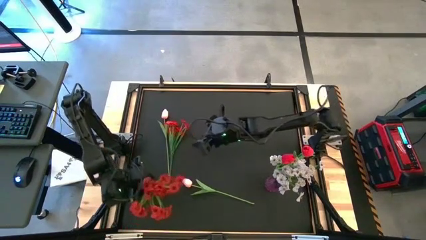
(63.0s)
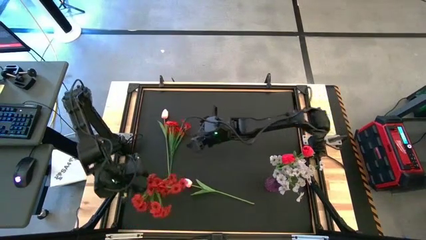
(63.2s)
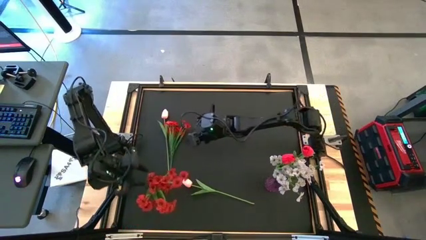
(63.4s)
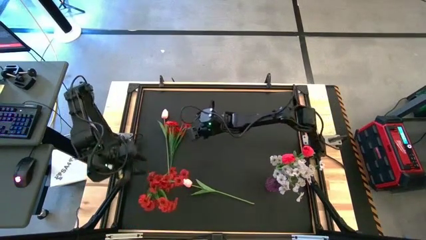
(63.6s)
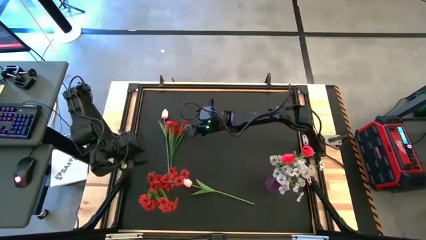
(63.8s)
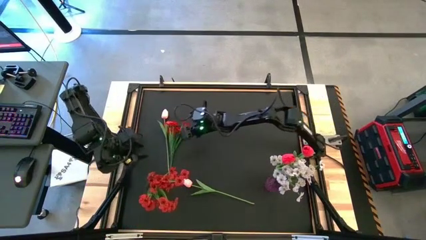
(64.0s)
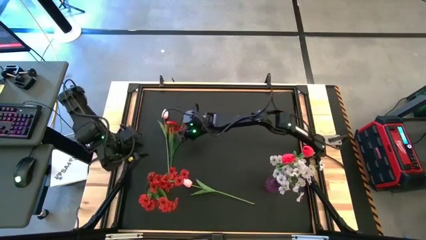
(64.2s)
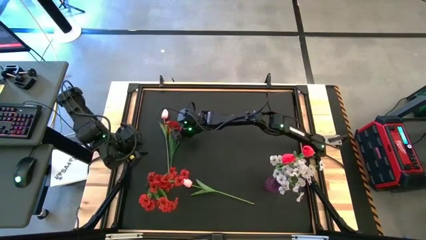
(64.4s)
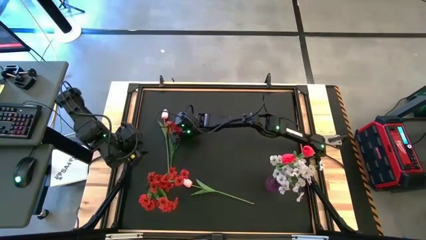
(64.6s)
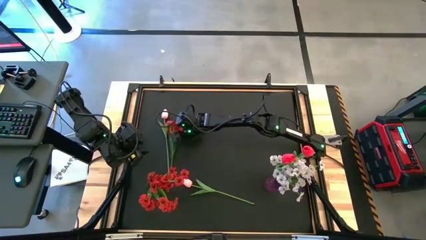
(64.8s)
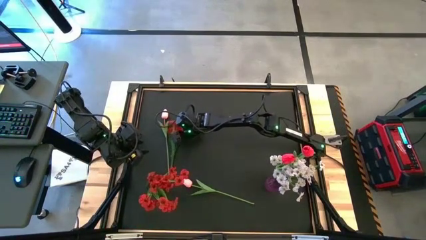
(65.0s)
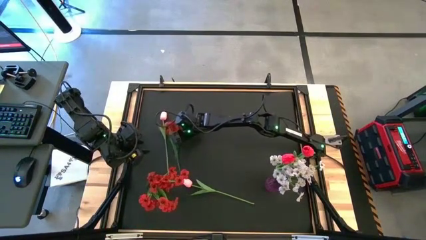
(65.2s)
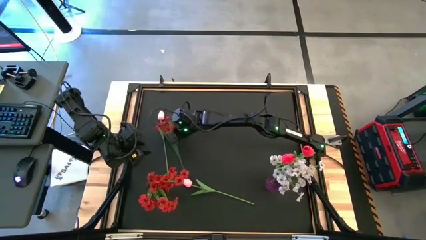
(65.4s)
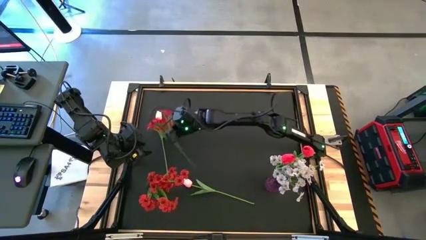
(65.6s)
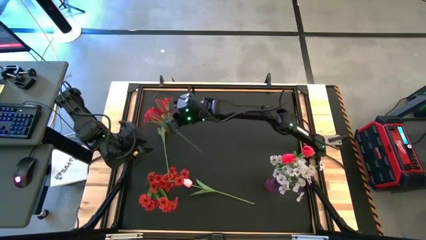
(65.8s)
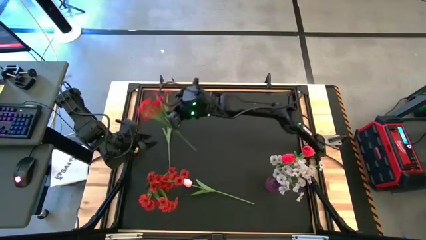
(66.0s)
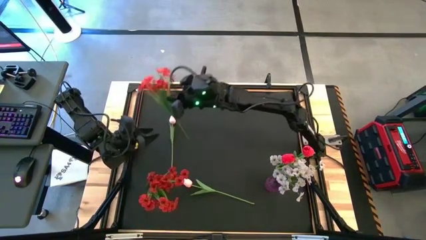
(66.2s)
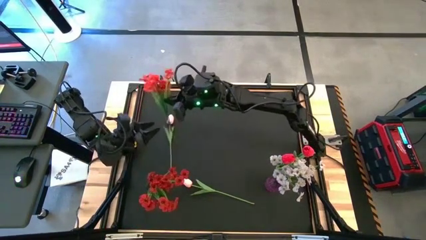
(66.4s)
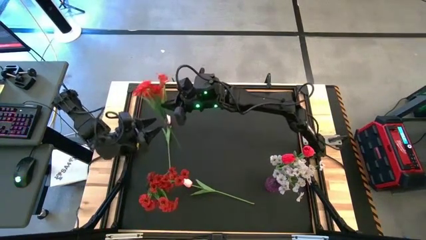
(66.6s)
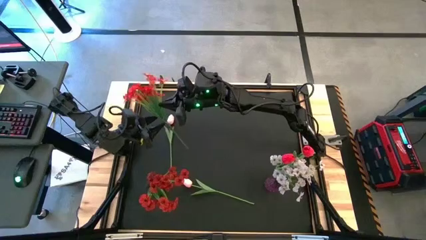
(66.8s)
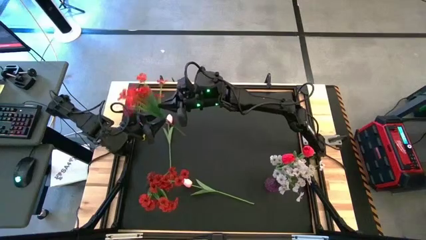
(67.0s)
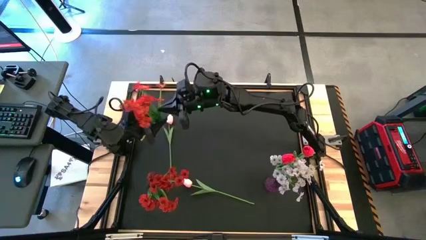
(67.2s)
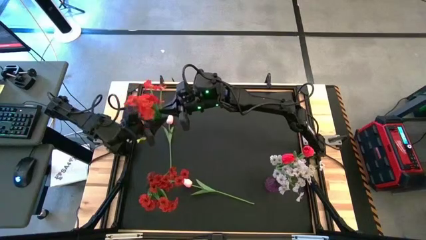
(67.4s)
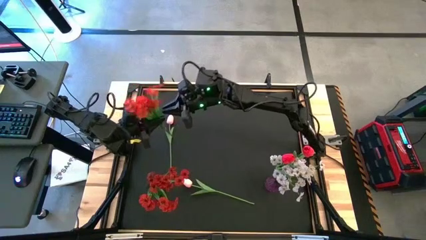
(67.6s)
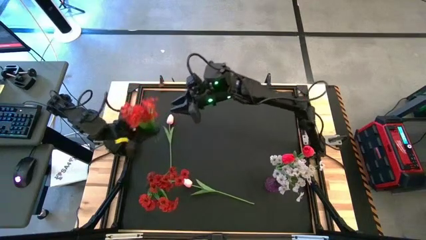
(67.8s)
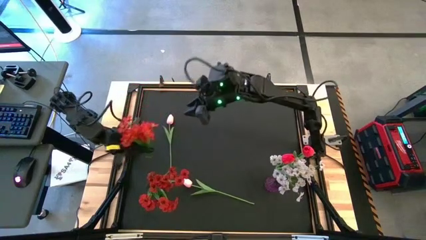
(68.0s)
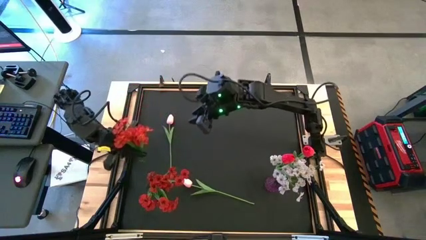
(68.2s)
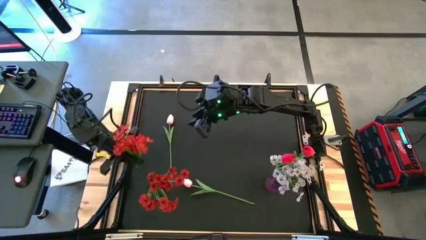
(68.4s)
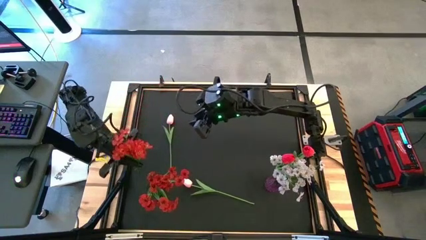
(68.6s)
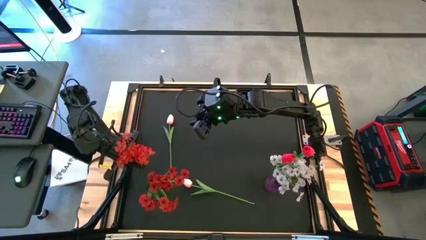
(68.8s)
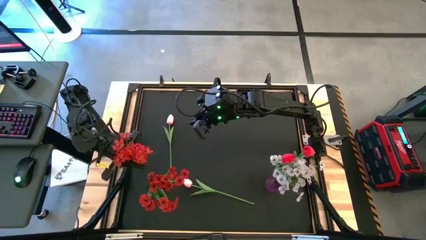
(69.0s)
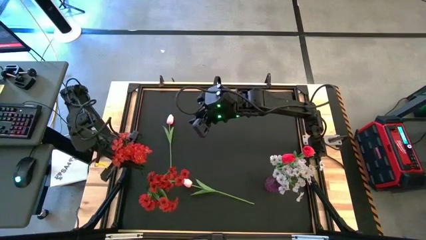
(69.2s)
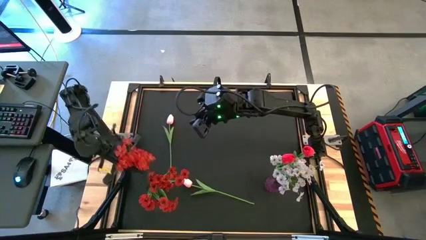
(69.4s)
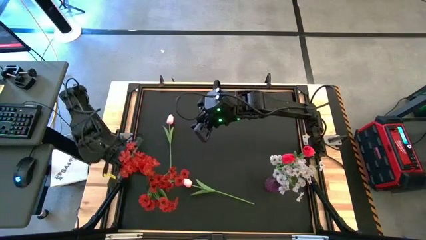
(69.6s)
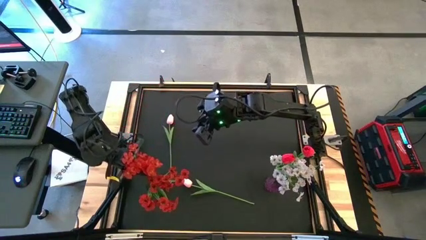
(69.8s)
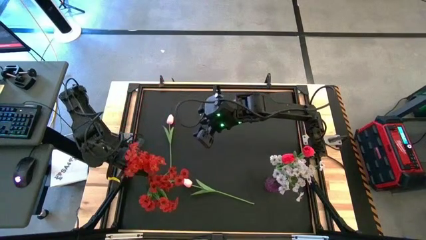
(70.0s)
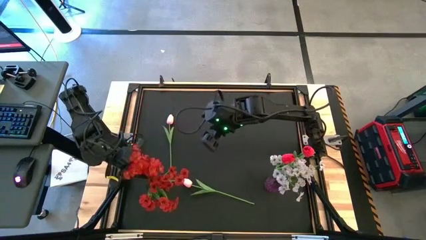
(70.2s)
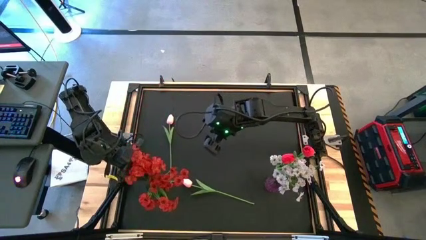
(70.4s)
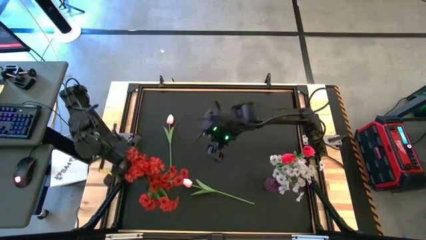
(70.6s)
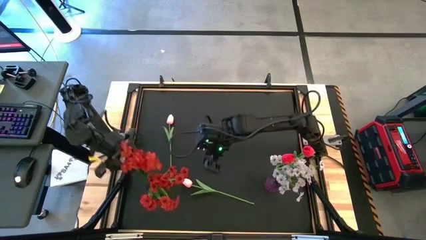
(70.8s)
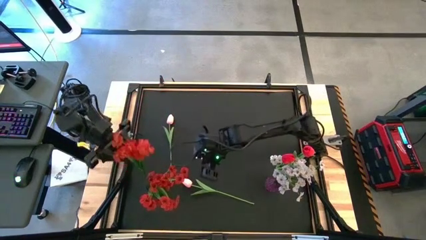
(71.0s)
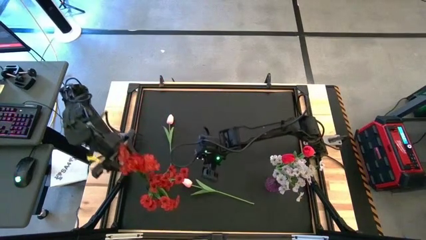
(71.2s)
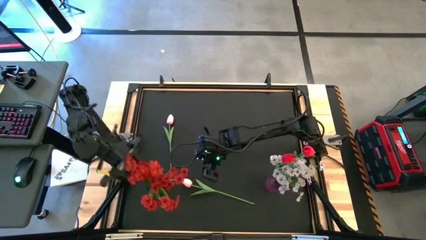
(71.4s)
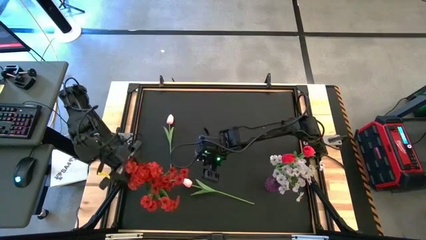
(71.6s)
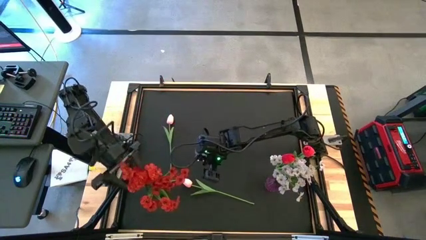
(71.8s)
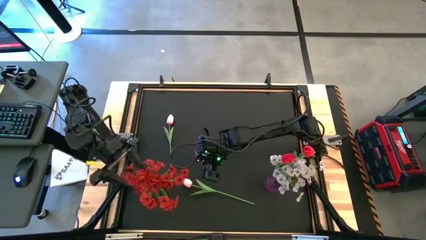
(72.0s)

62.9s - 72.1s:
Task: Sort flowers into vase by color
Put the red flower into the green vase

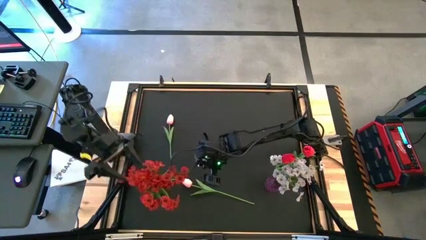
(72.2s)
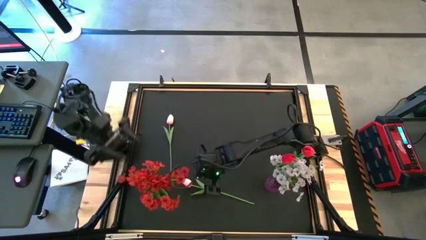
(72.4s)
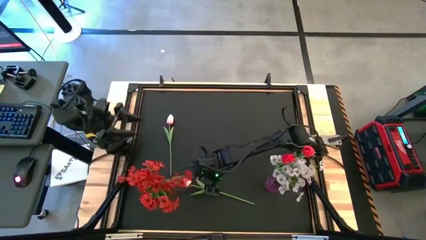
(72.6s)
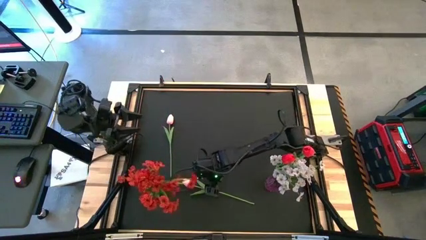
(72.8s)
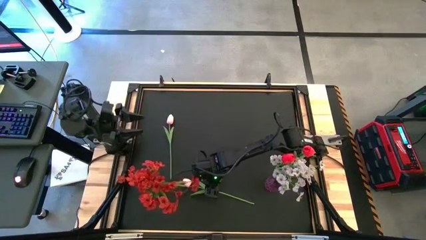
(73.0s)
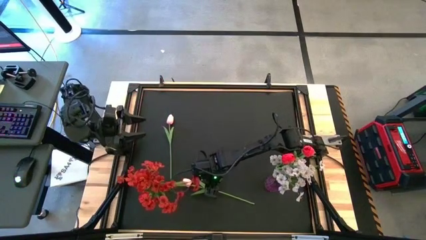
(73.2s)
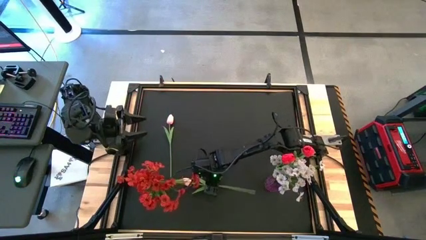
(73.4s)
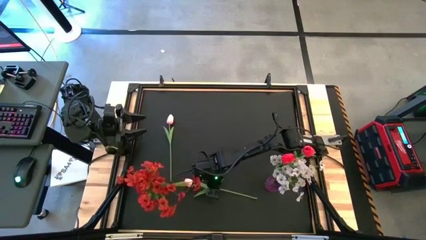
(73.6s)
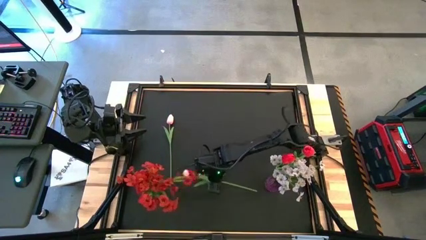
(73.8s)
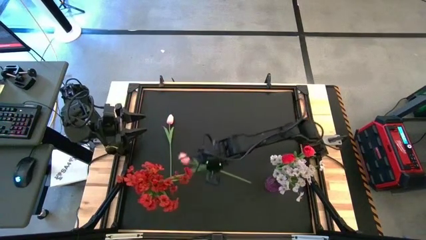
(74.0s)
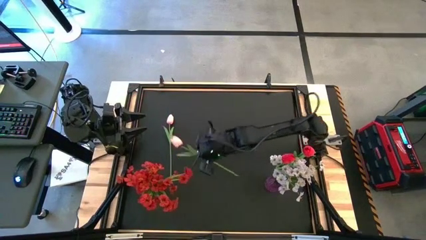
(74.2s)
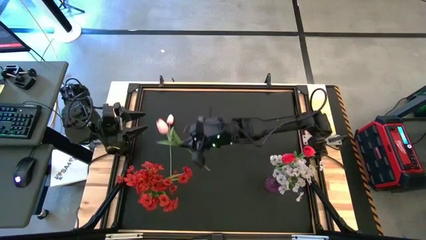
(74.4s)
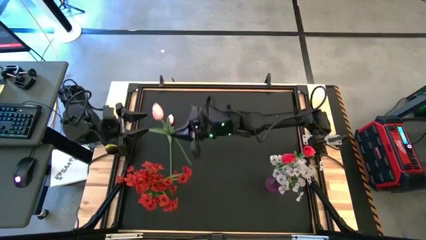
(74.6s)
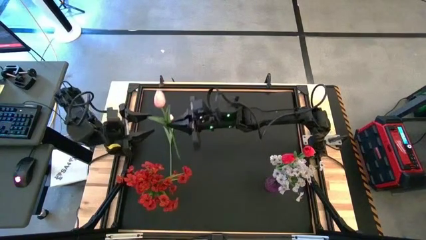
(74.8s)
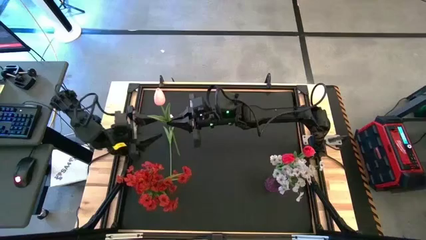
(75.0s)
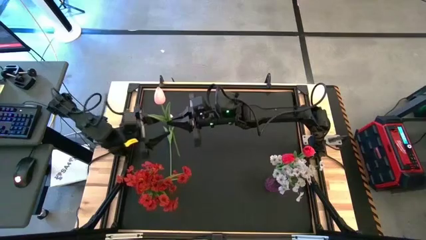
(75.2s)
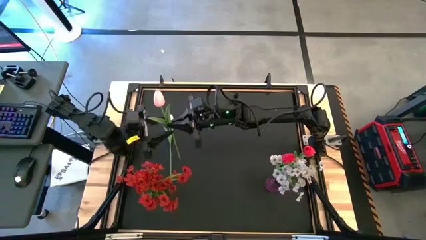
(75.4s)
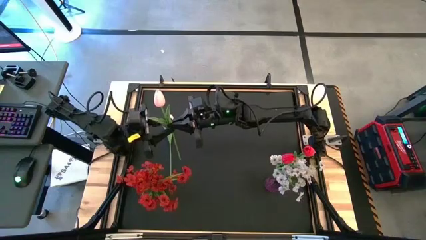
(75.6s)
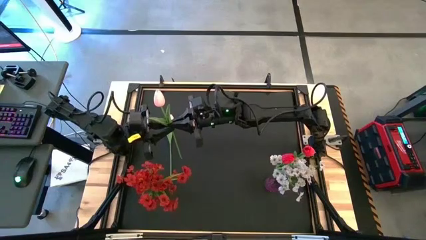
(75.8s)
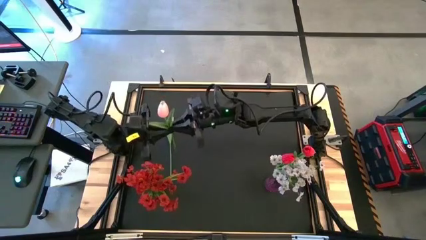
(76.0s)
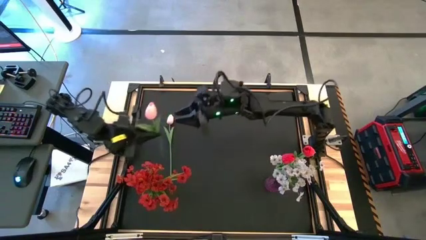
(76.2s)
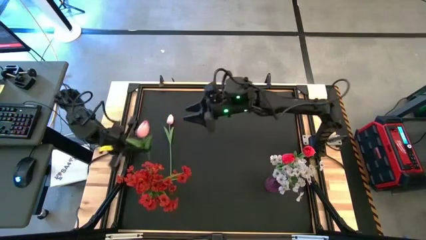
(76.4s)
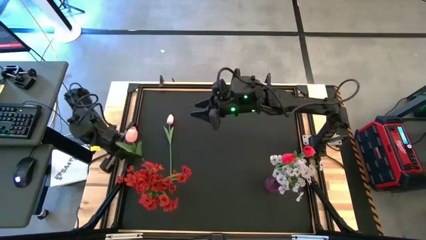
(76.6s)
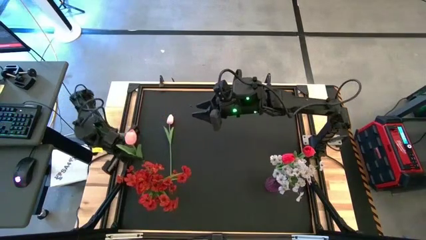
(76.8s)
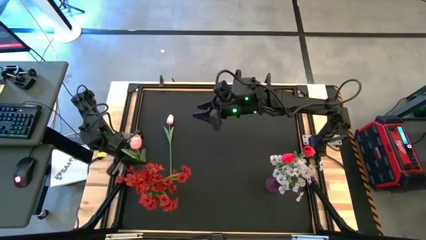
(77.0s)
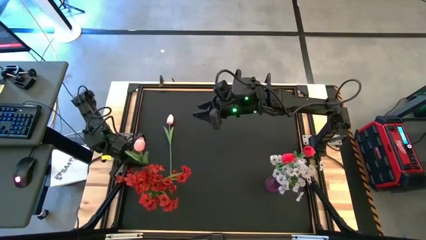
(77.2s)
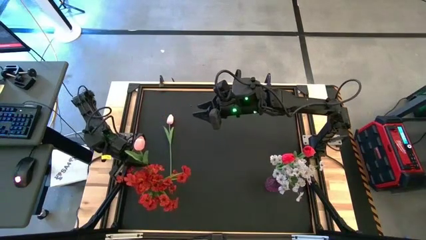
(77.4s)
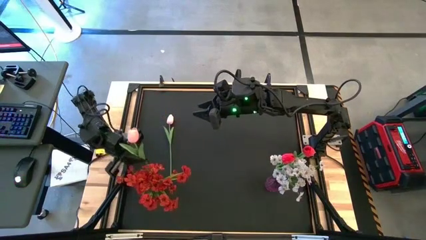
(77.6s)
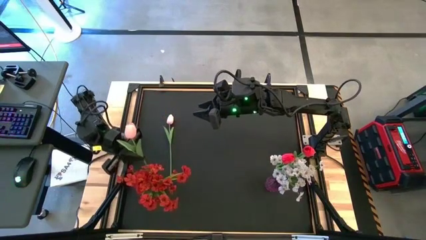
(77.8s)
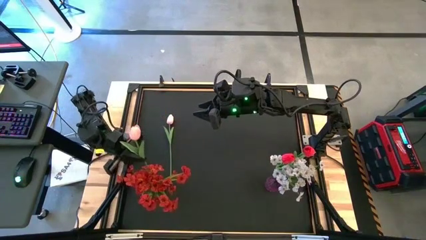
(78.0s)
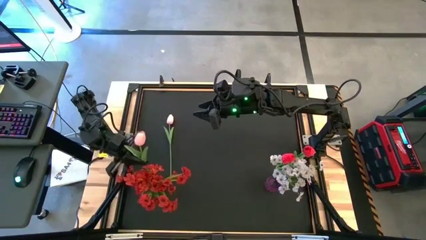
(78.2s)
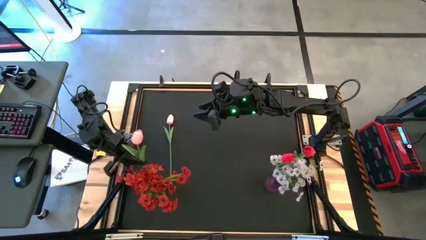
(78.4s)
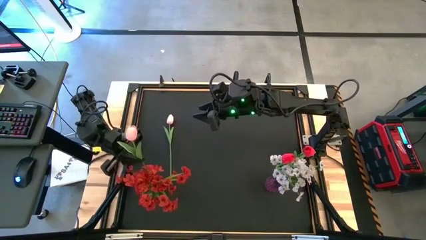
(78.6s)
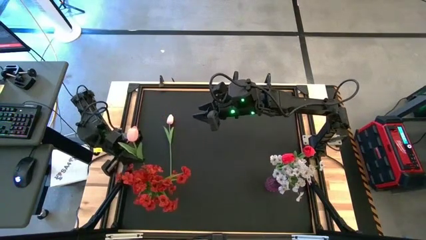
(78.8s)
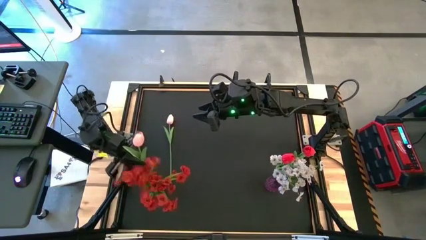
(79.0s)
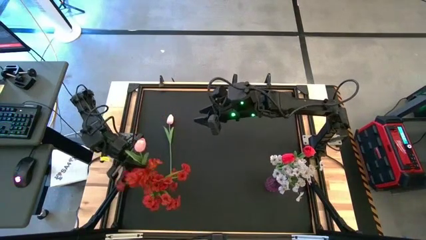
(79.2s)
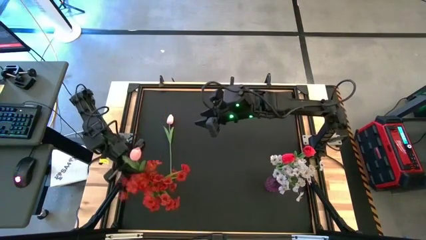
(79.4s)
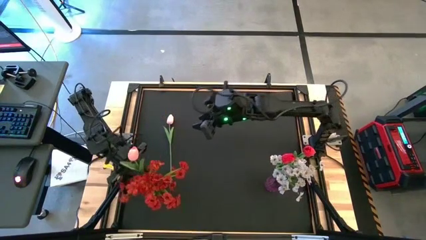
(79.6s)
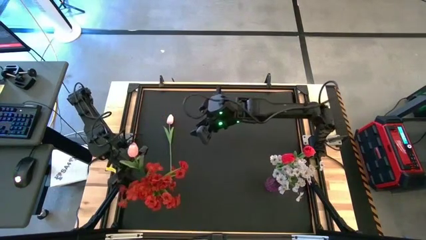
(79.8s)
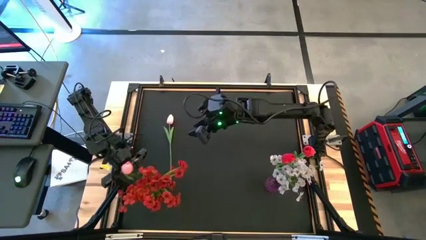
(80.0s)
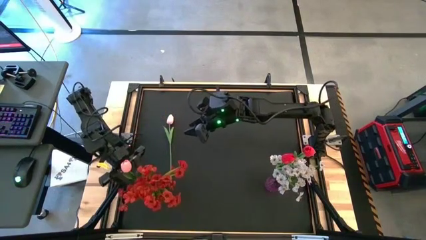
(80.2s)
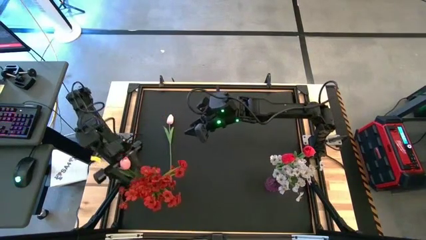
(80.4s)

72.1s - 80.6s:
Put the bottom pink flower into the green vase
